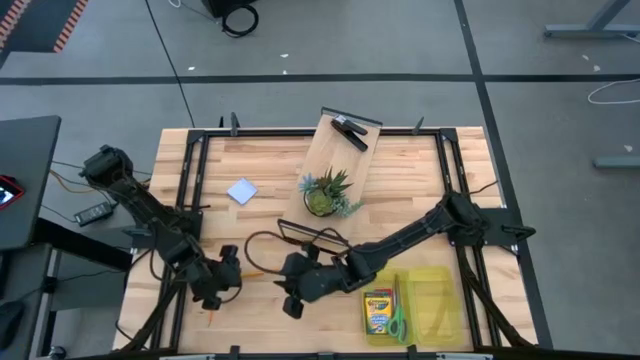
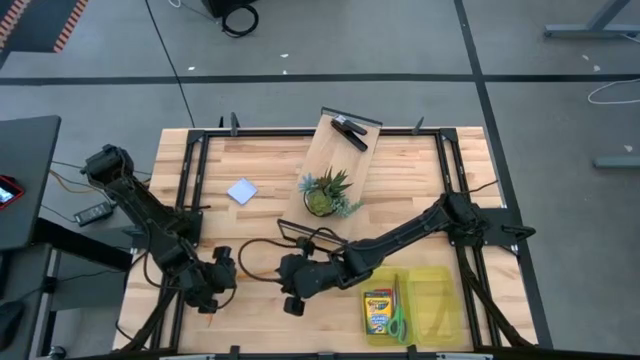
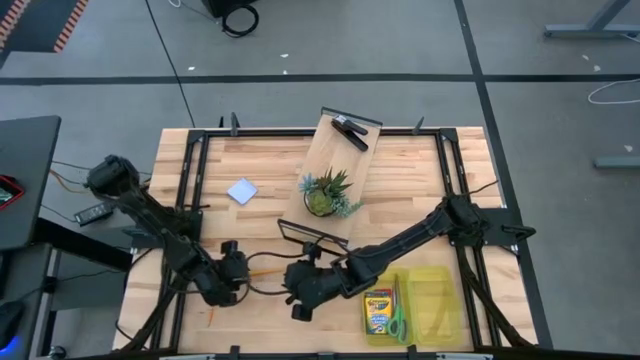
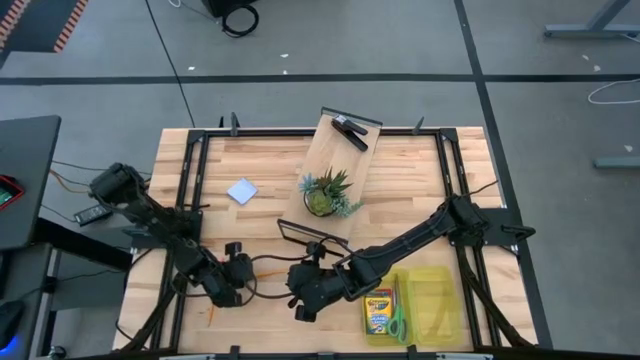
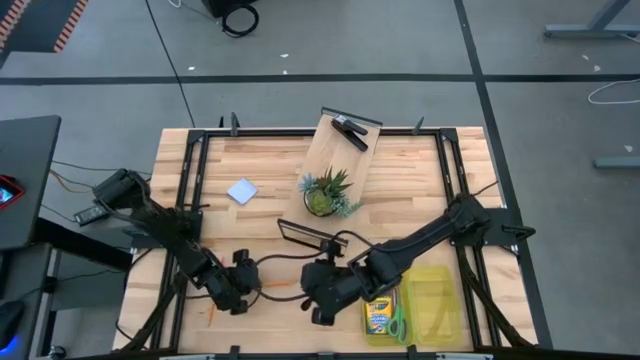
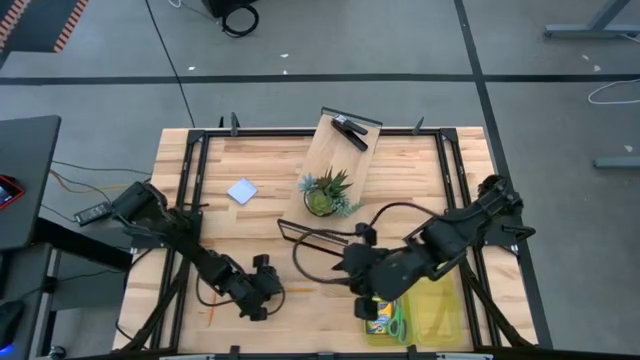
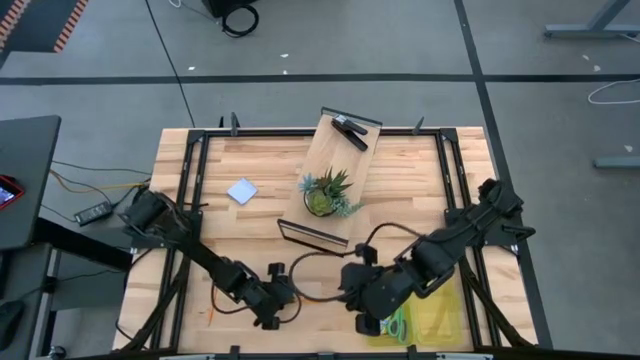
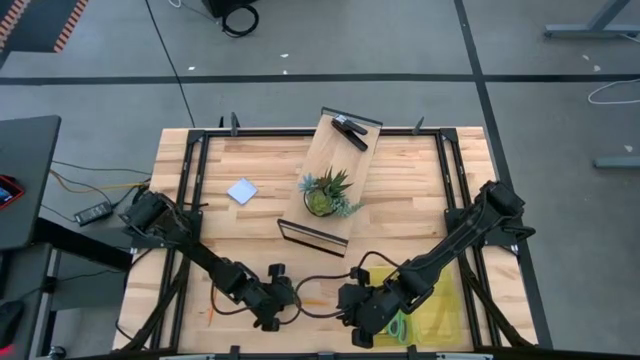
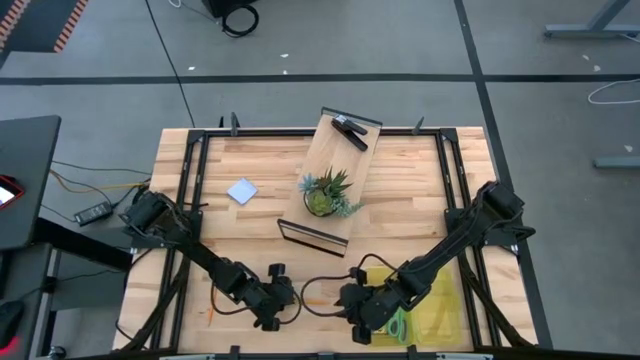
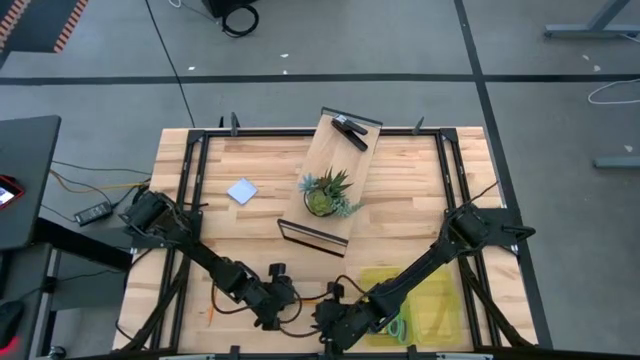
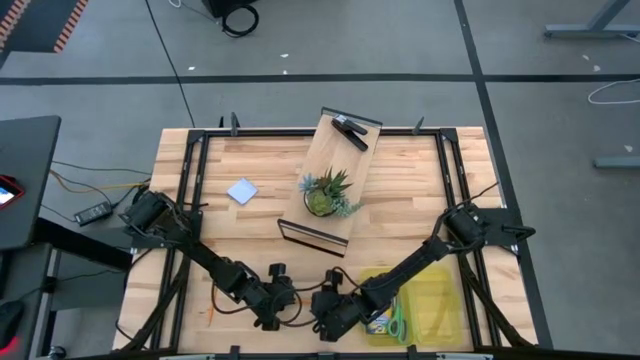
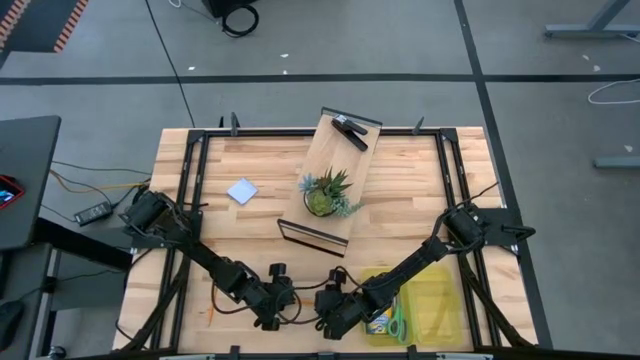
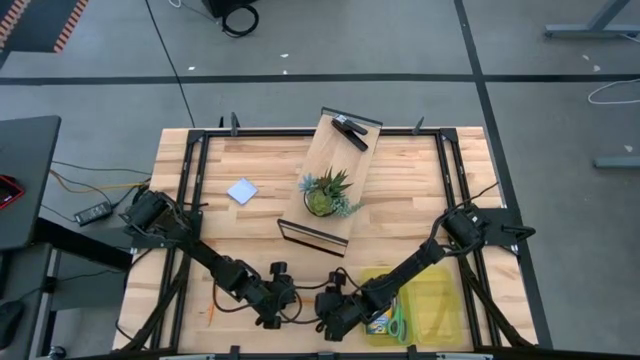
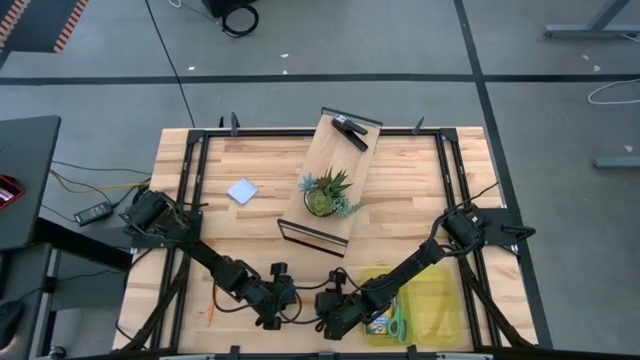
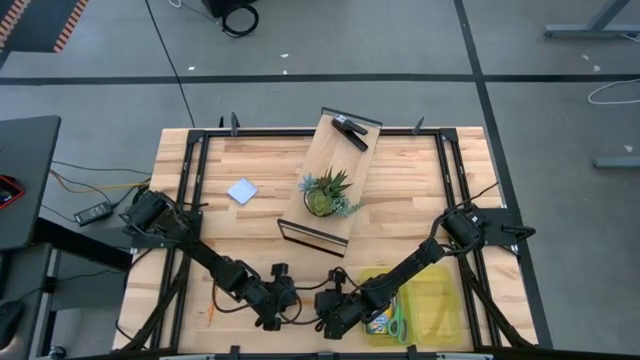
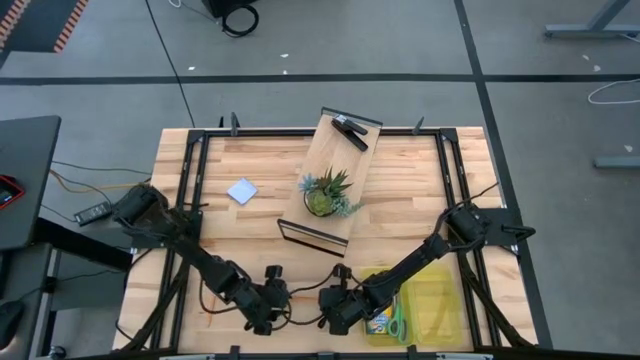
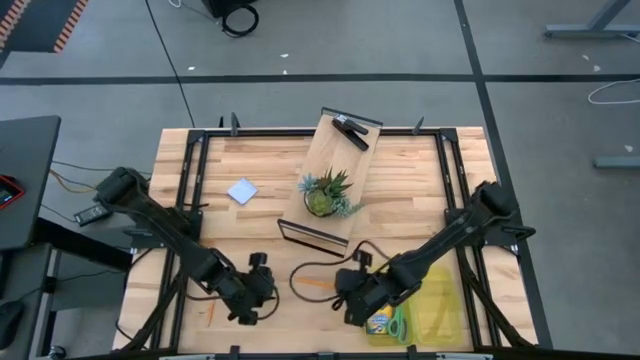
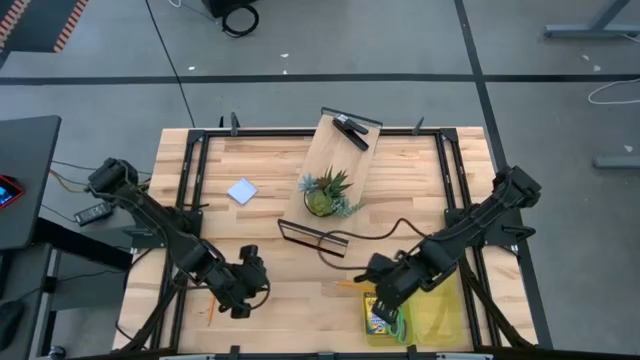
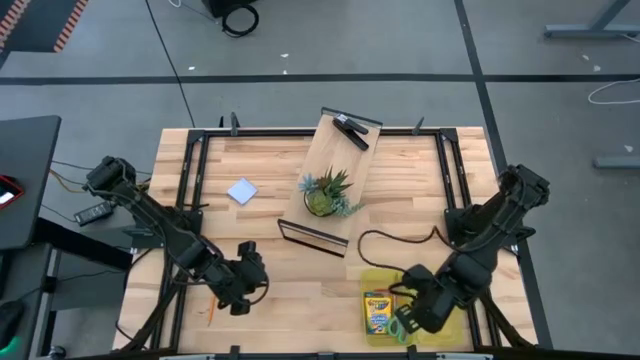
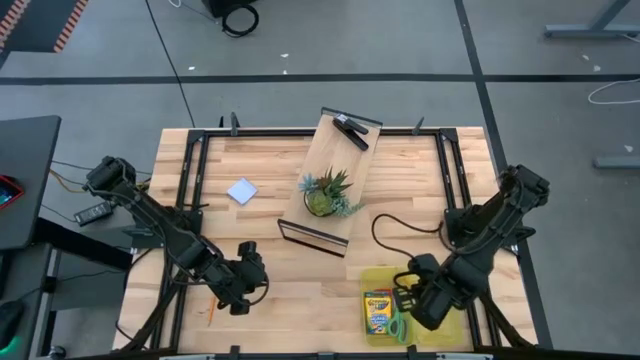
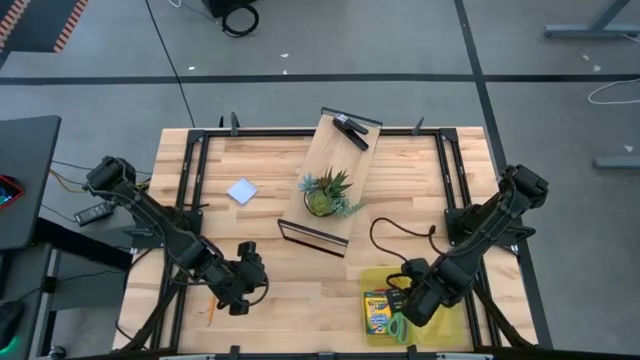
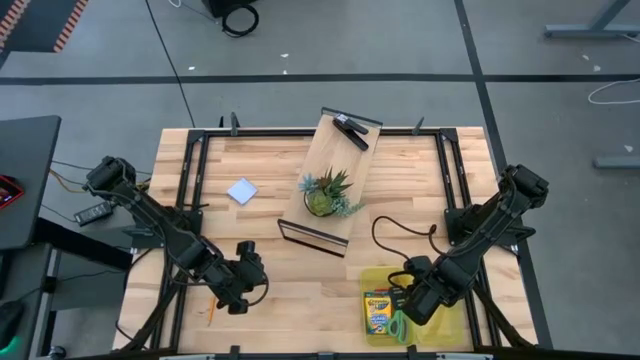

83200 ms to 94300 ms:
Task: Pack school essentials
Put the top orange pencil into the yellow supply box

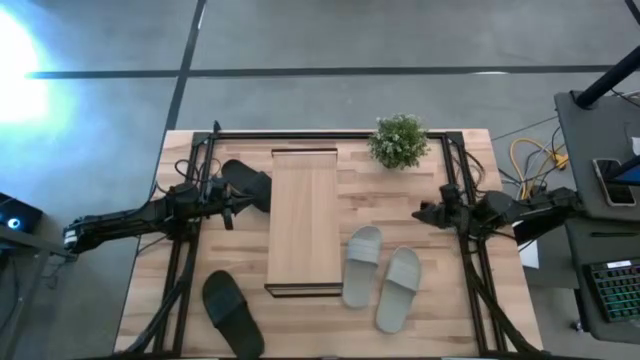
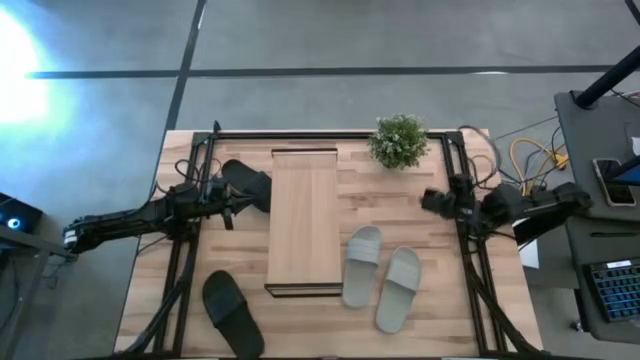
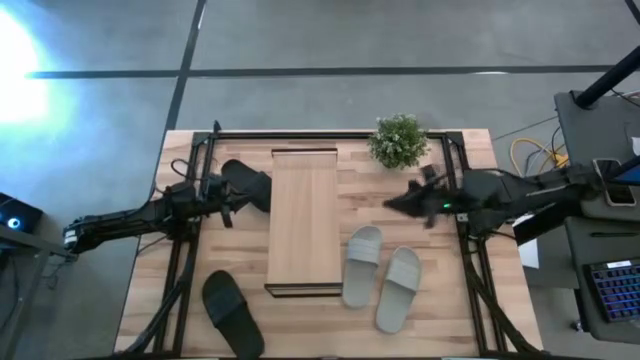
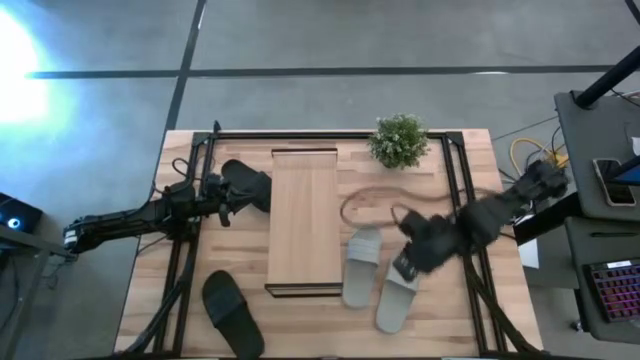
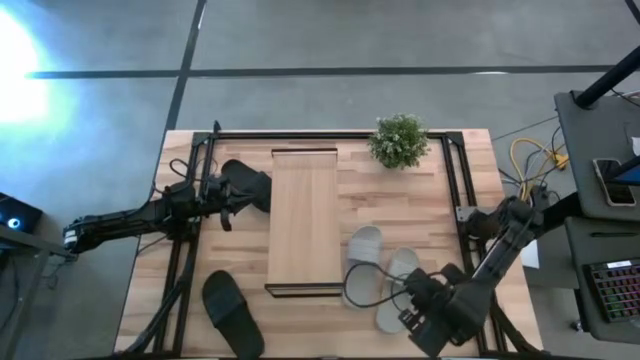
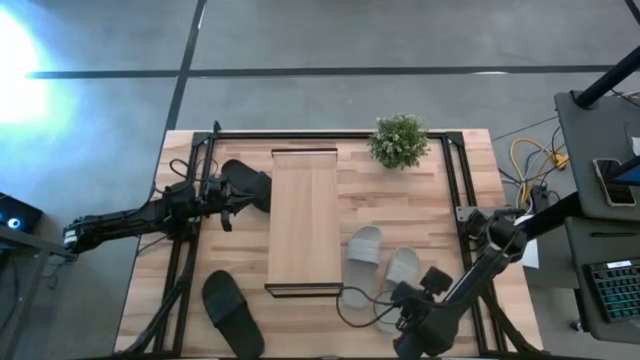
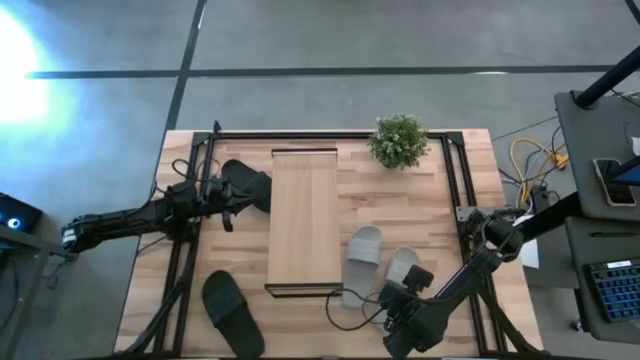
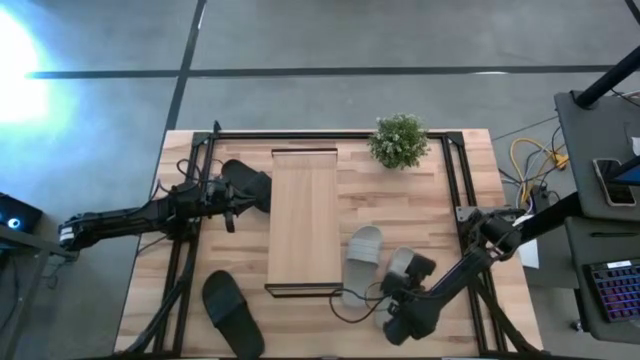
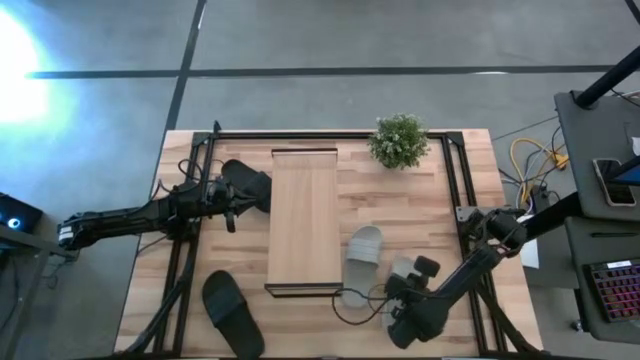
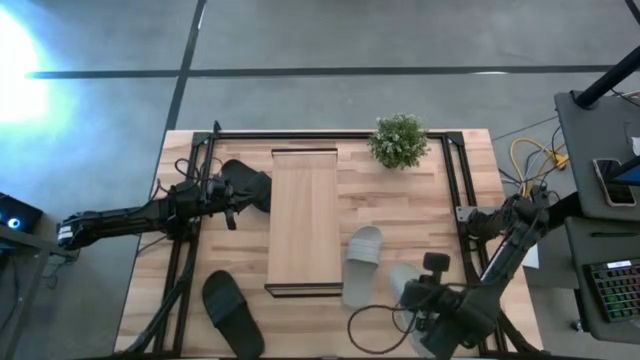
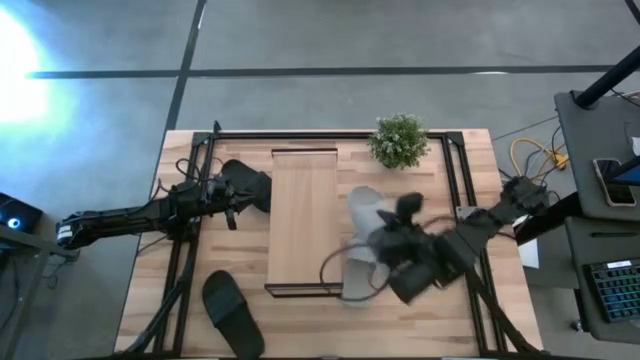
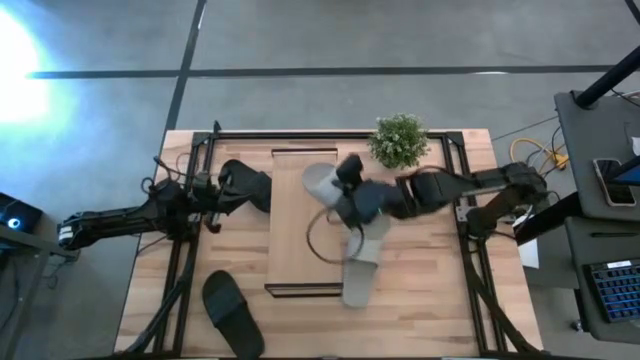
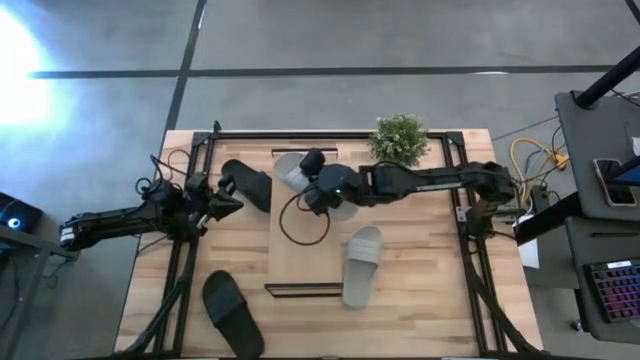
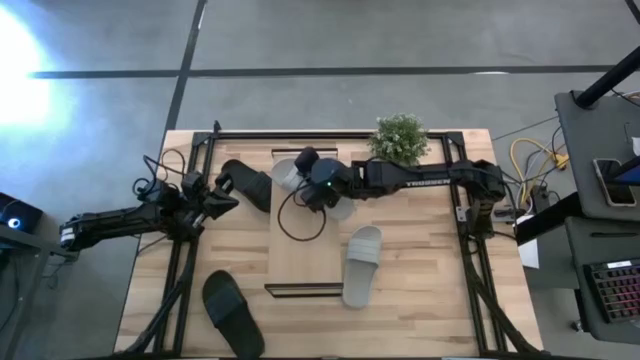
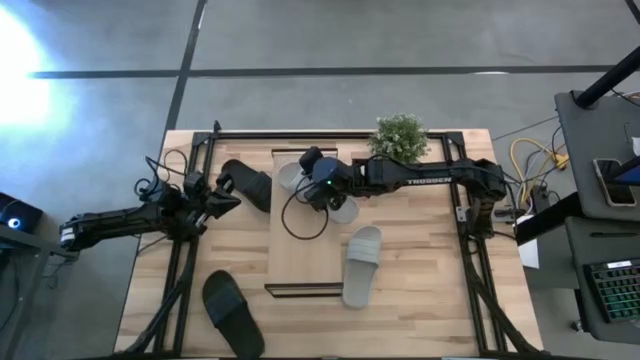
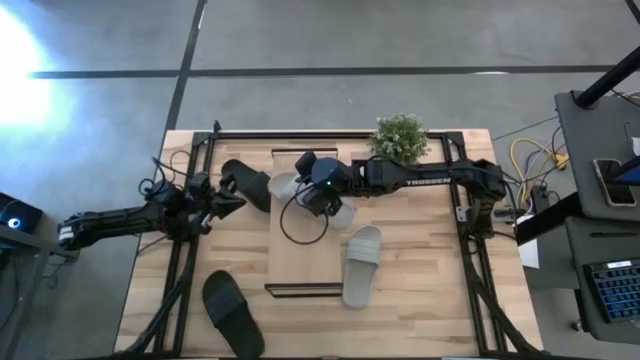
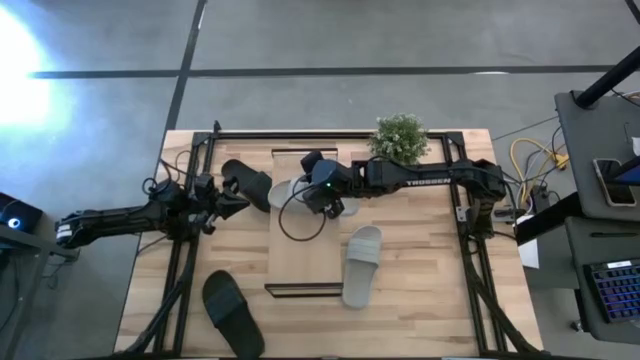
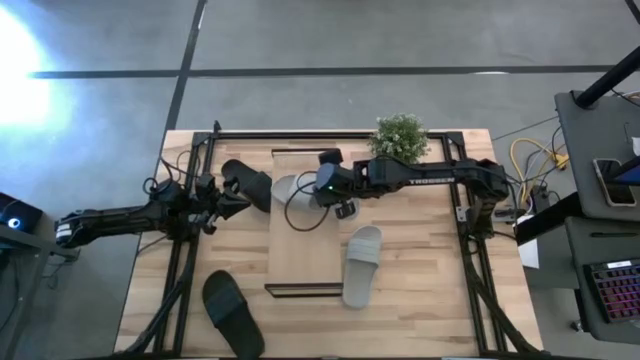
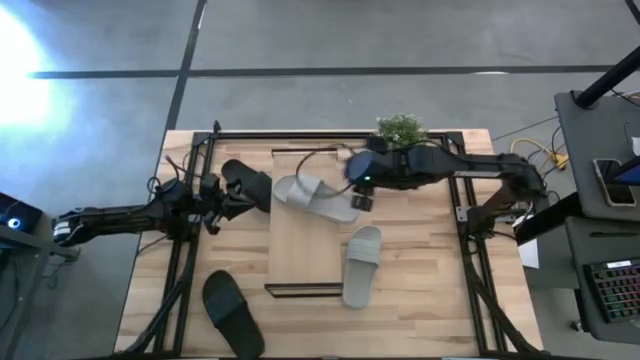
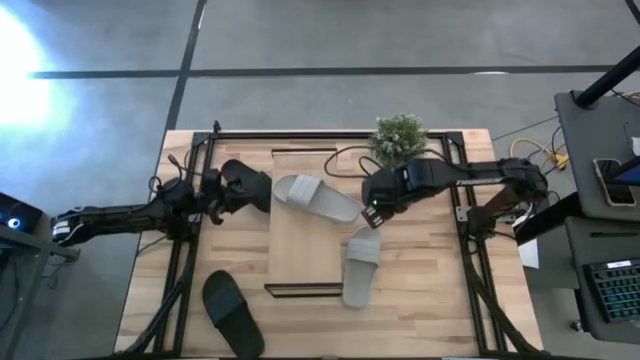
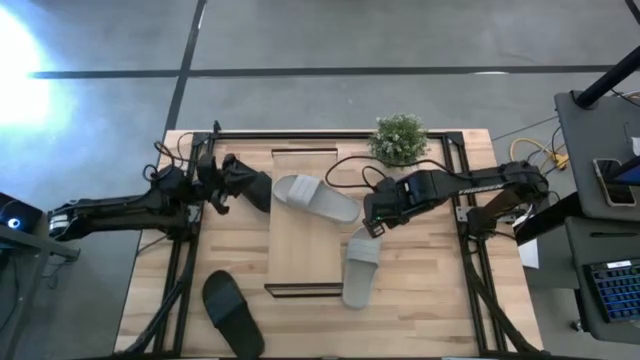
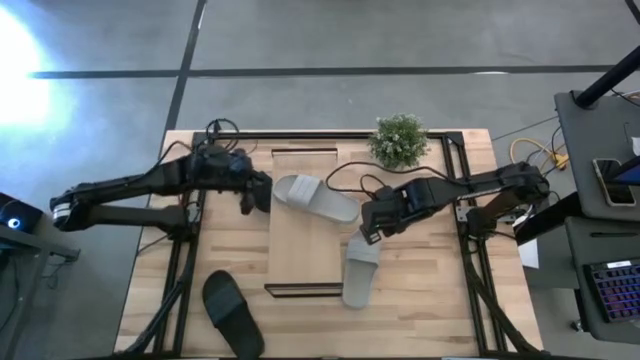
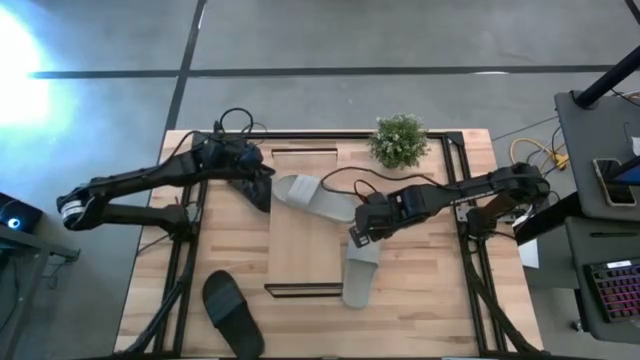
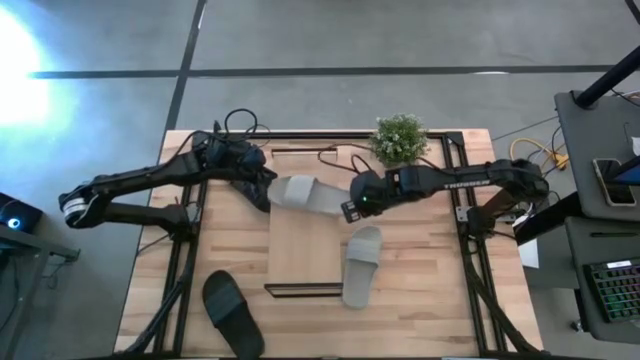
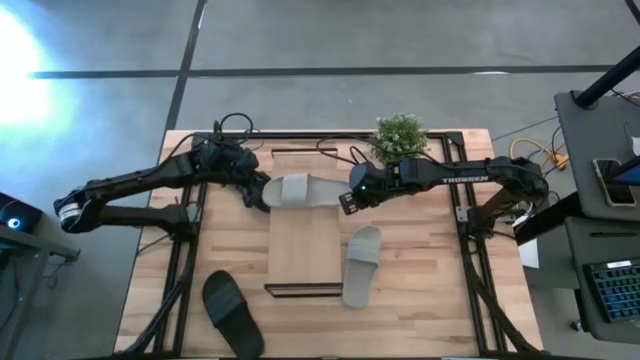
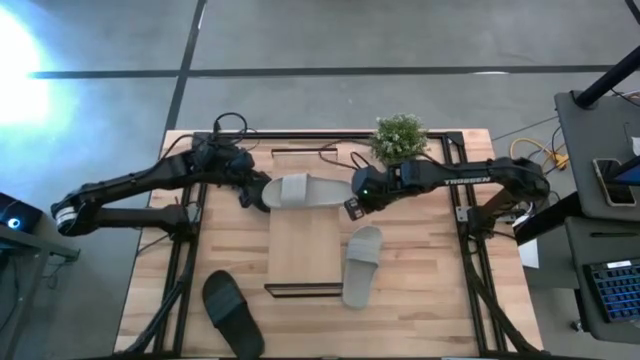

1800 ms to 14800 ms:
Task: Pick and place slides into the shelf
Put the right gray slide on the shelf
